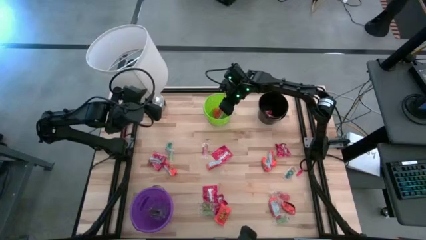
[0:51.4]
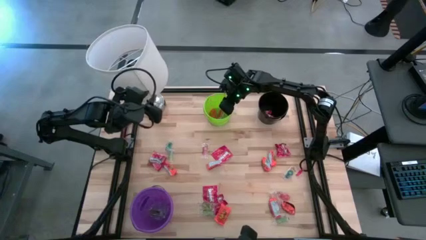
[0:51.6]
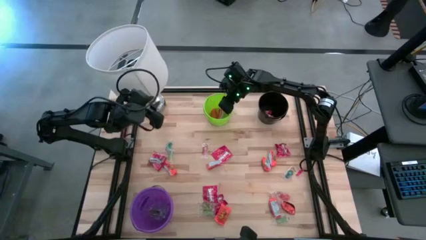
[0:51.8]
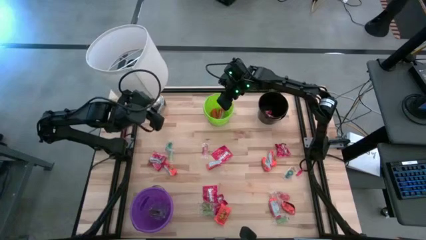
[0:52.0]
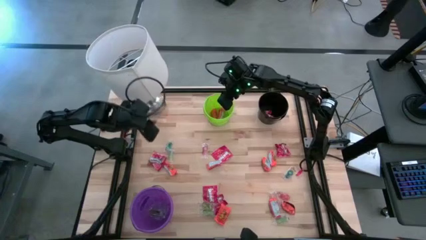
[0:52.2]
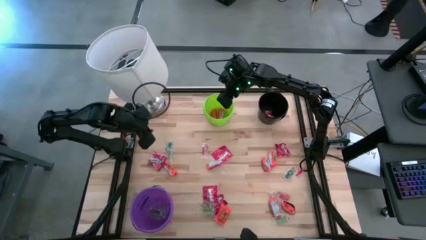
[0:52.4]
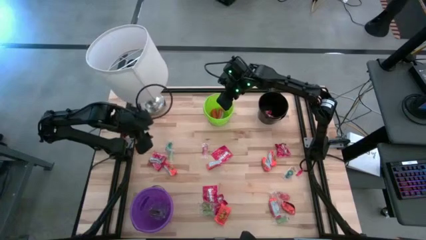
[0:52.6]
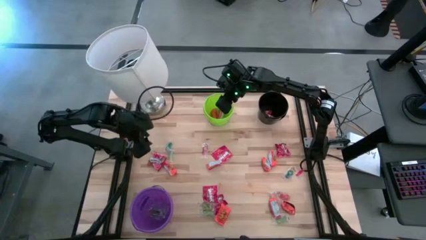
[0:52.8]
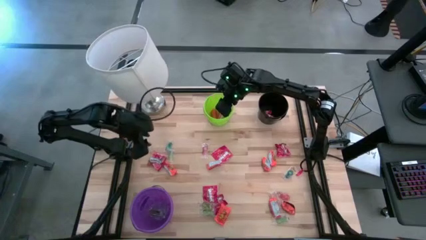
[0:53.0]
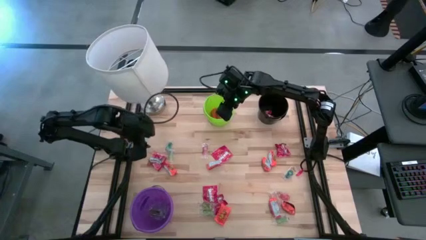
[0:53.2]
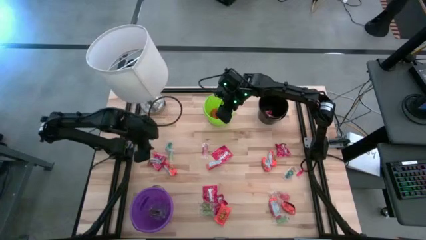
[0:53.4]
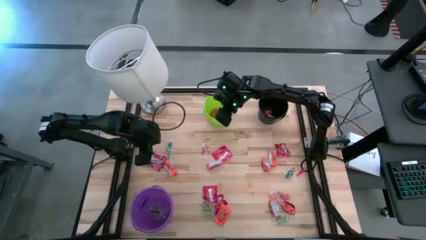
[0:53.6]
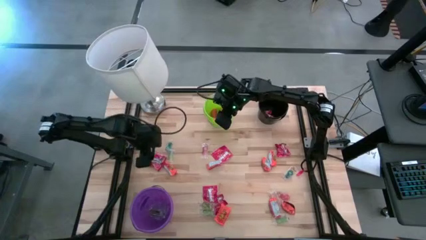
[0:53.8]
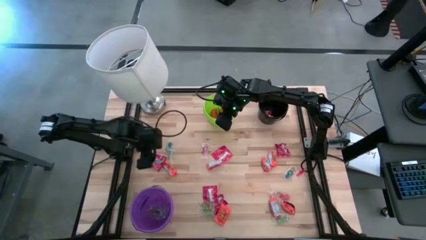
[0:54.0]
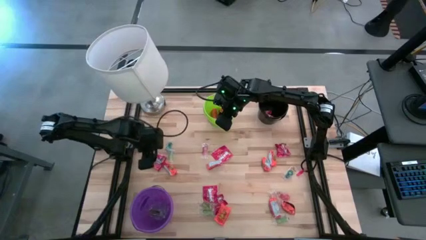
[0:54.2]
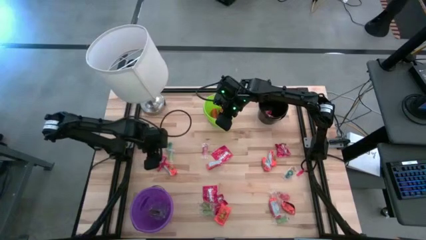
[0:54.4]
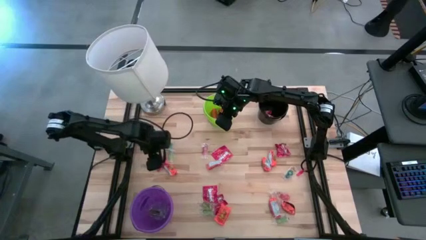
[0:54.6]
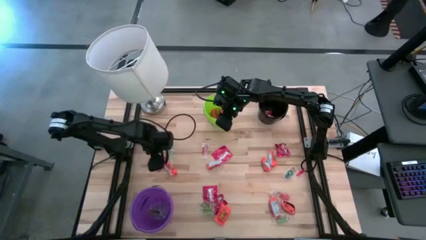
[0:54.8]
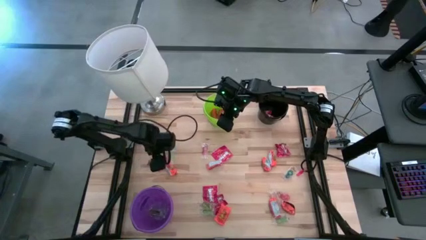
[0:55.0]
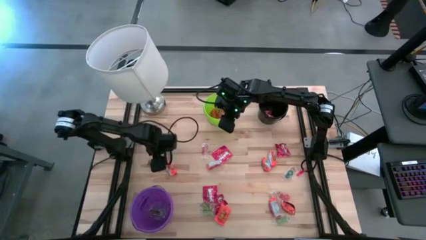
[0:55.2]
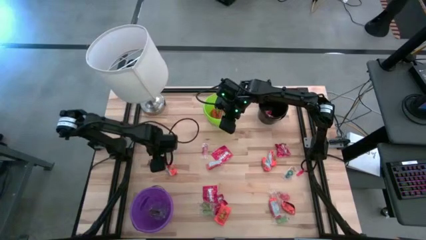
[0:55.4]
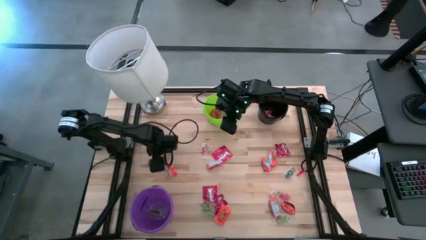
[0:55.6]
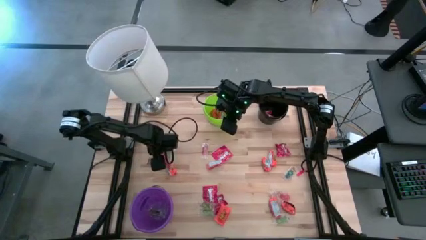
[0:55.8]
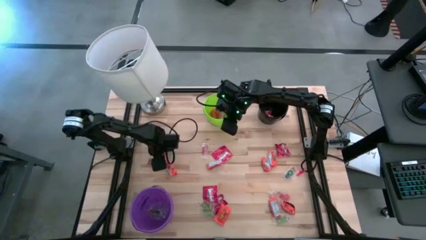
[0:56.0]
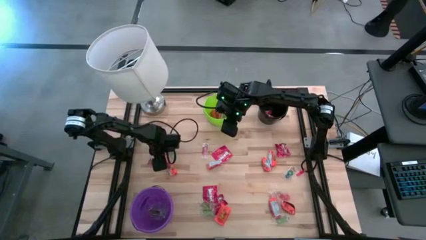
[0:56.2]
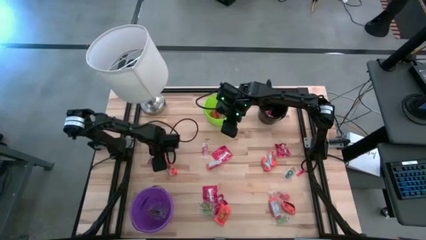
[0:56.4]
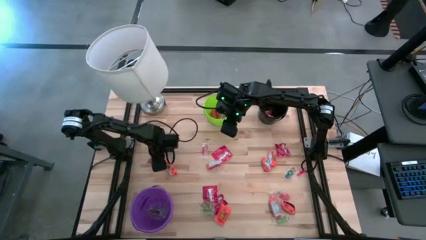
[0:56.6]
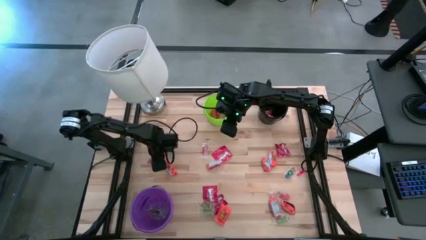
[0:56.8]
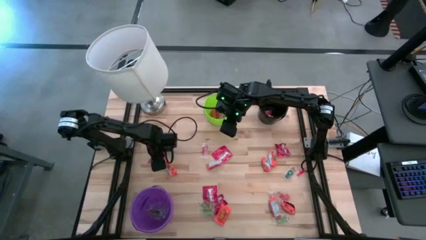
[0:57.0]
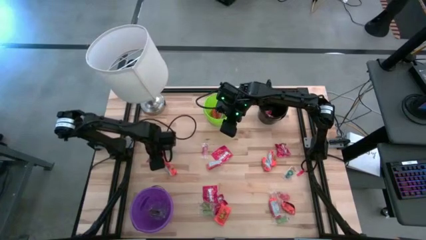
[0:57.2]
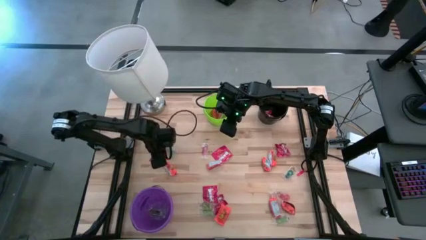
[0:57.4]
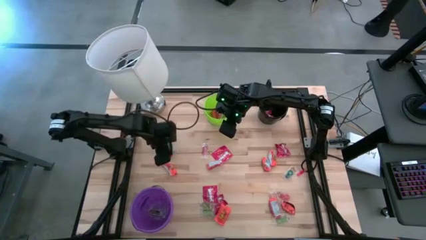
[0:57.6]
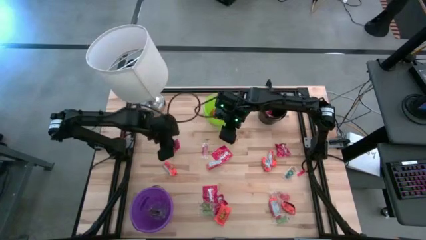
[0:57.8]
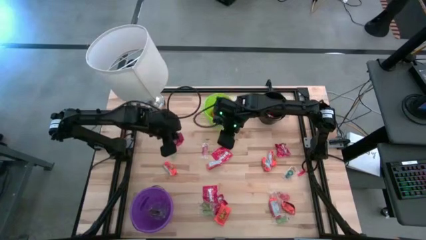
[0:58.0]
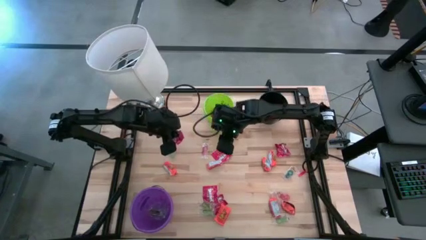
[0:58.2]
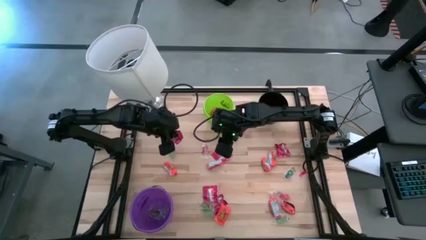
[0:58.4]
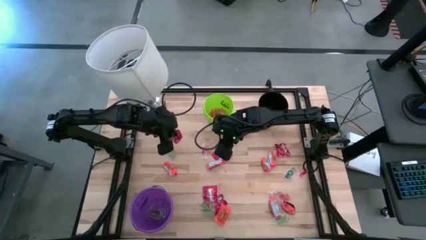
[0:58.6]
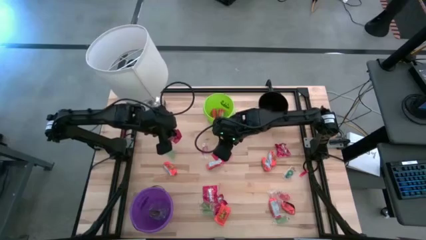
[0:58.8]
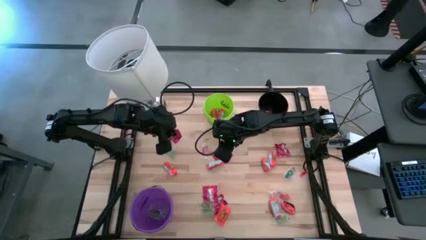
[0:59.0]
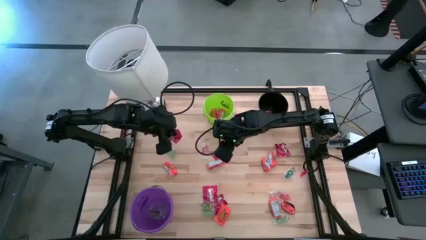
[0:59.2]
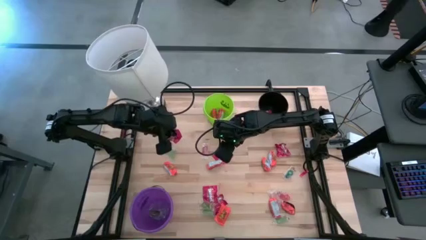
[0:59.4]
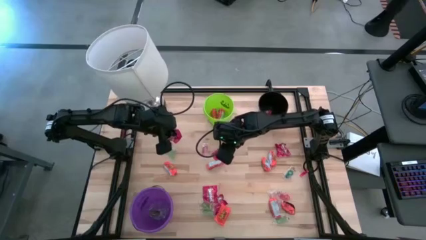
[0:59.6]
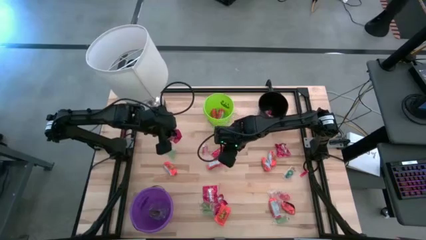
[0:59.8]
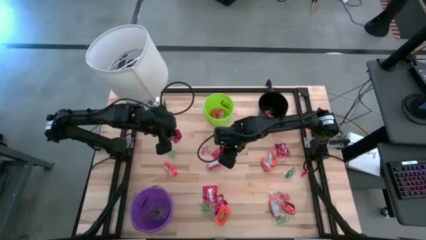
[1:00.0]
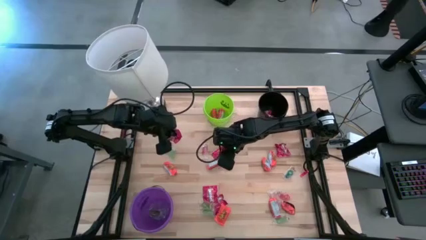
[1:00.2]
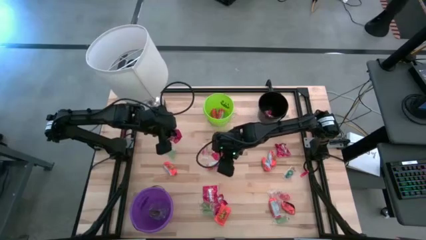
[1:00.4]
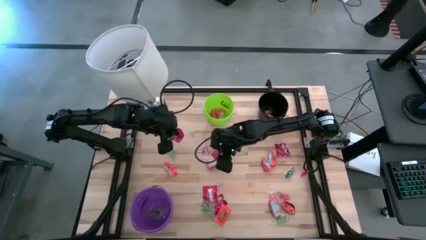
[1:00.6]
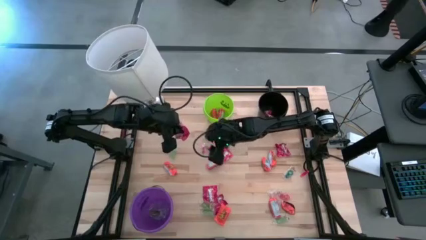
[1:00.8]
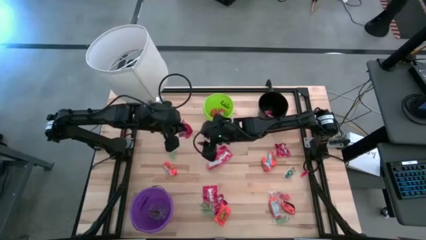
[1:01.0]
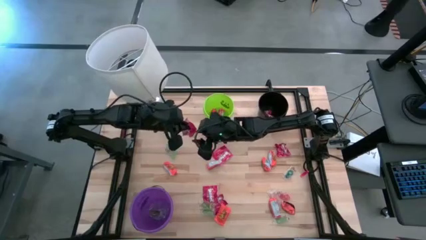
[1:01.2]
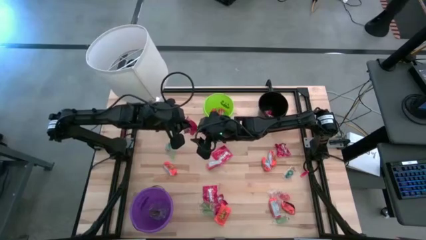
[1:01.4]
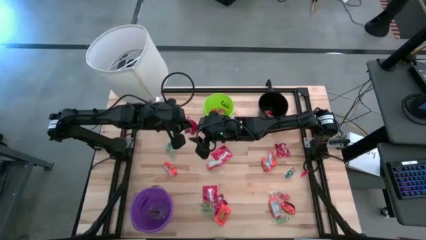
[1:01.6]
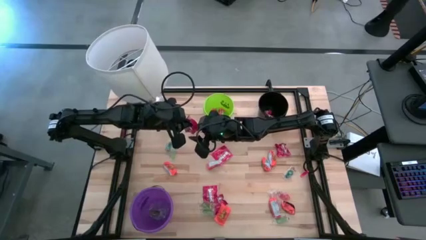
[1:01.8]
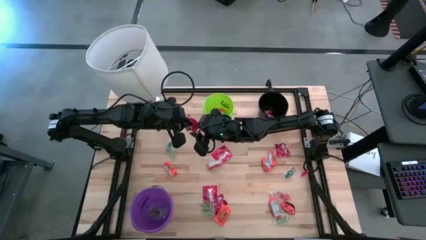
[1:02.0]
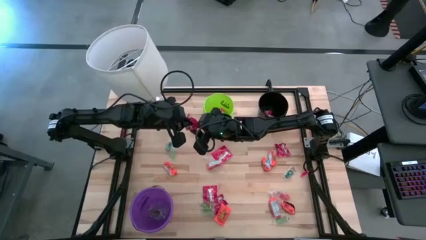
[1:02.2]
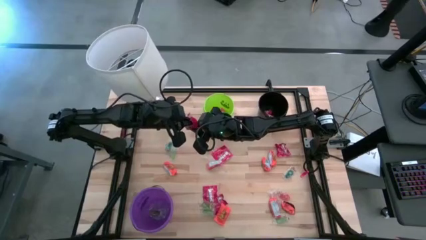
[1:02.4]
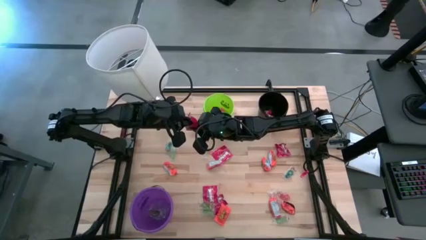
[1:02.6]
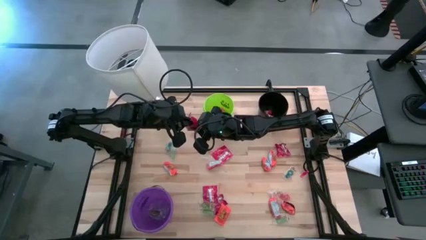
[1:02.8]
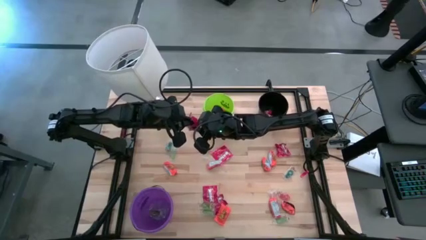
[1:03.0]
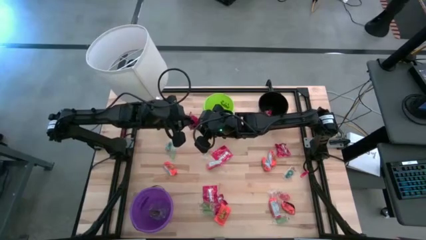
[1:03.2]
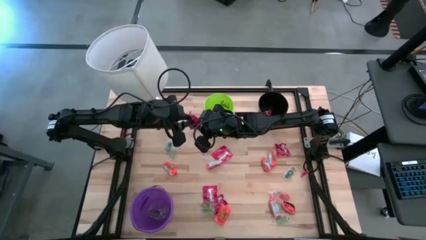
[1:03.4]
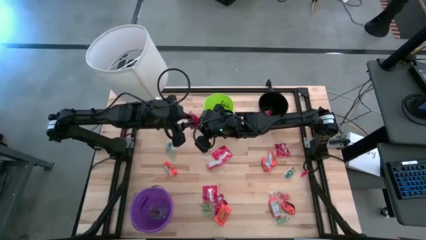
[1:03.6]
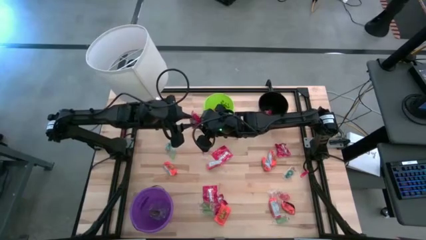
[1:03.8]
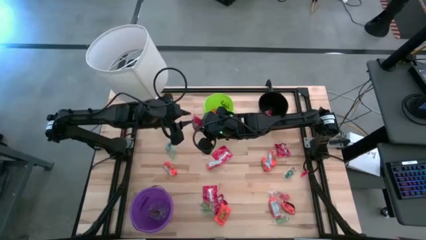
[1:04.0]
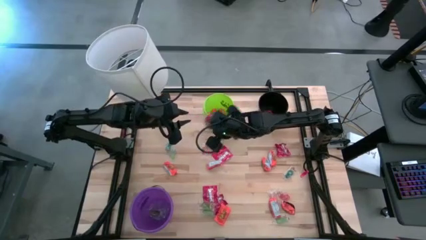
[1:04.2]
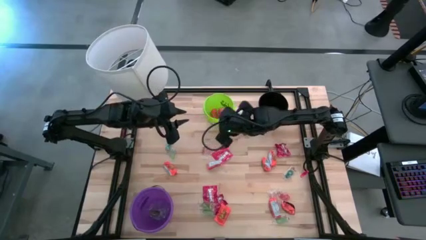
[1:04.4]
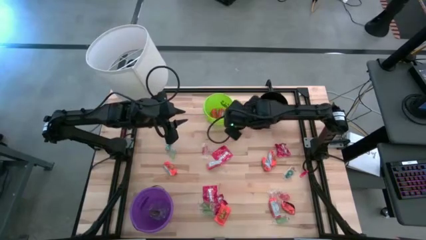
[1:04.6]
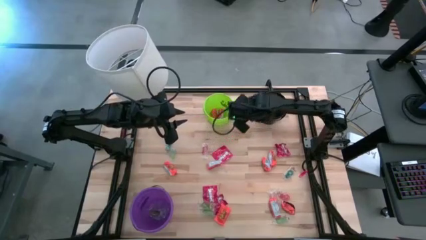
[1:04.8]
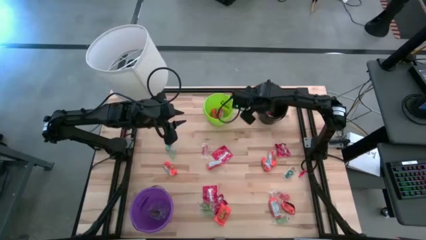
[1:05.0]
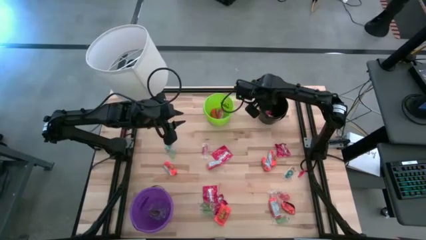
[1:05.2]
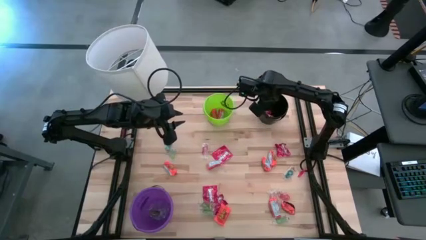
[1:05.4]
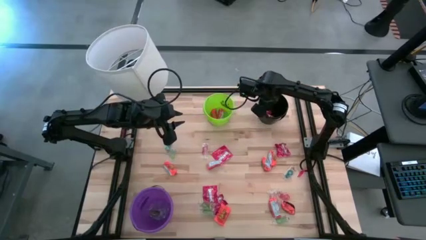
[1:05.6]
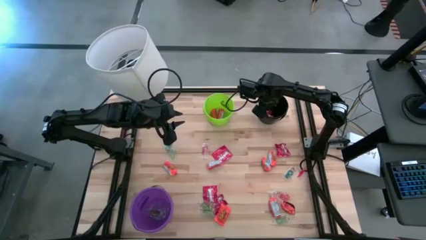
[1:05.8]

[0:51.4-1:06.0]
Task: Sort candy
Put the red candy into the black bucket

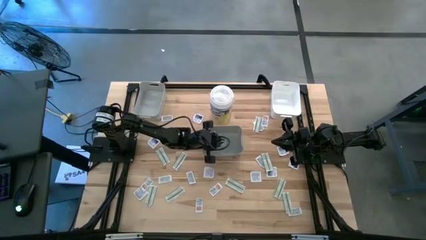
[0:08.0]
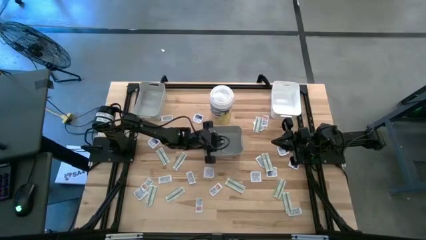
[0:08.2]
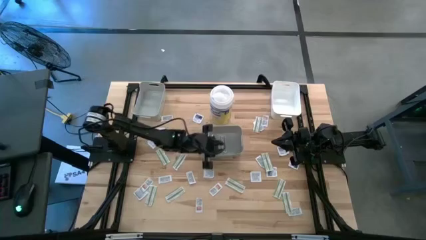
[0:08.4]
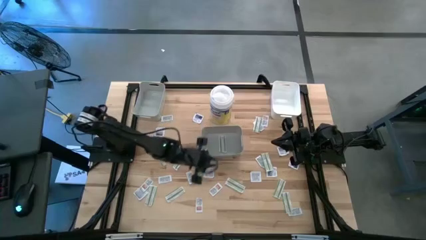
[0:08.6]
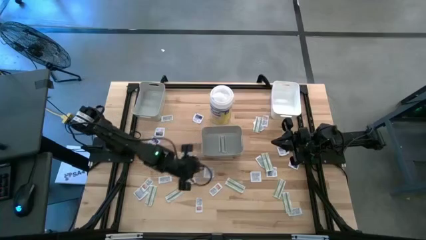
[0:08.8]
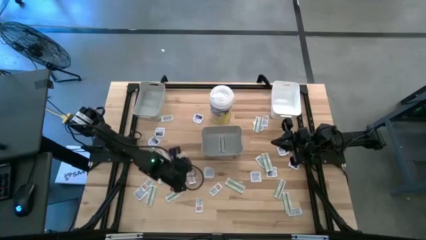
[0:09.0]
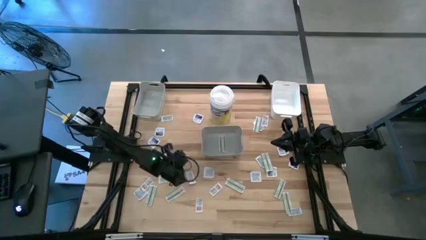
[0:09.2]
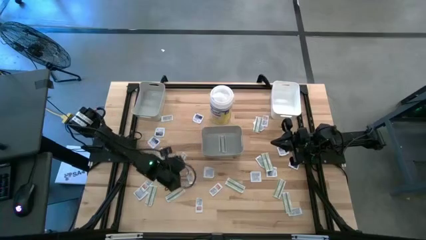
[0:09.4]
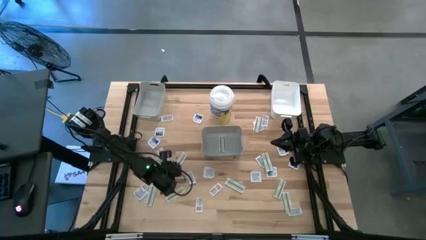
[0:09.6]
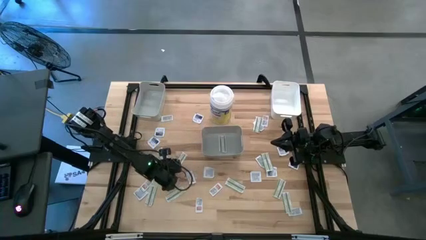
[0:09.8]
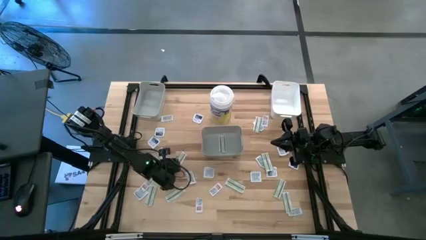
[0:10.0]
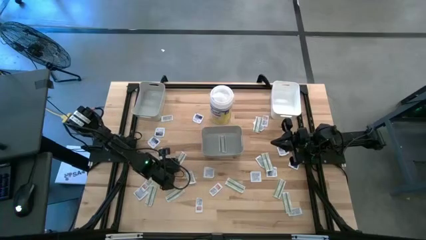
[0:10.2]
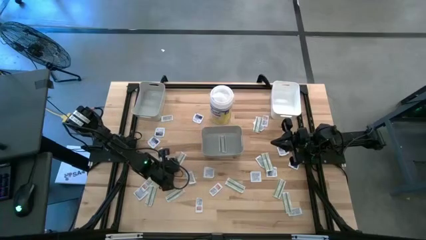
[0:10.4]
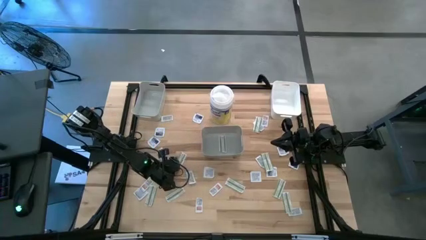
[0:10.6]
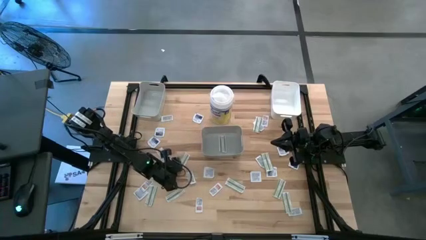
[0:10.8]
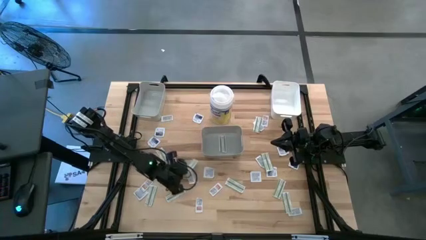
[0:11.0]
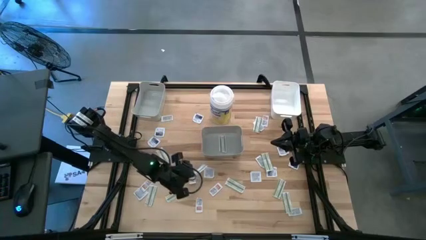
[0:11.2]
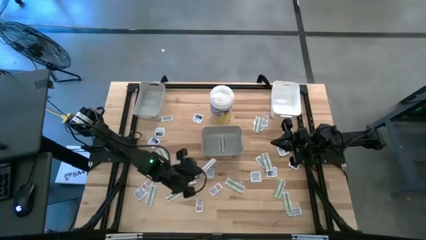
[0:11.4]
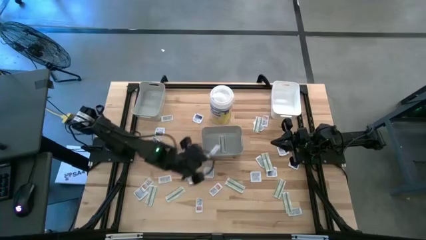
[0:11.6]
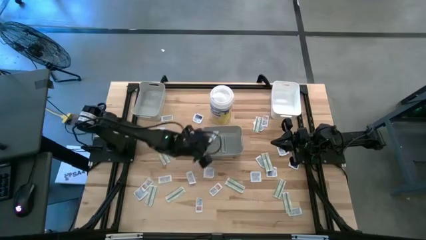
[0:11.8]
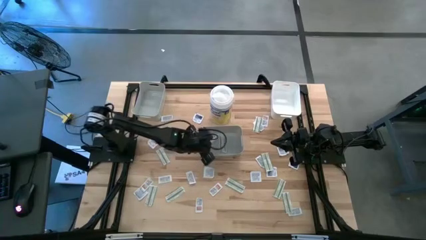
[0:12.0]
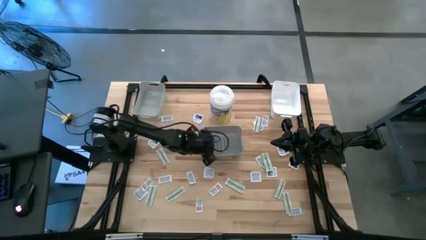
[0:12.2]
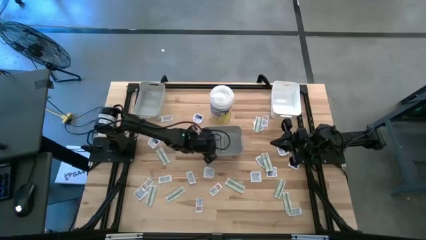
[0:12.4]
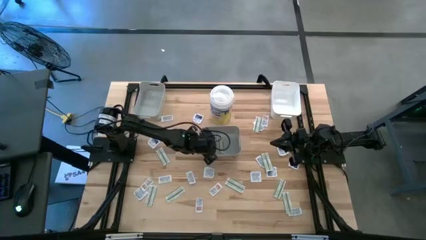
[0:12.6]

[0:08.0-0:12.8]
Task: Pick & Place First Aid Supplies
Put the bandage into the bottom gray bin
